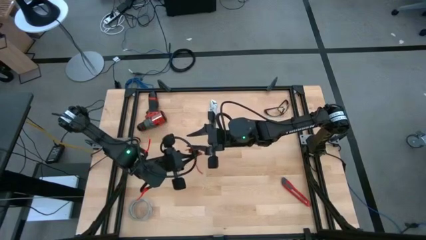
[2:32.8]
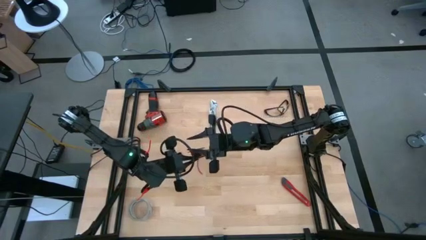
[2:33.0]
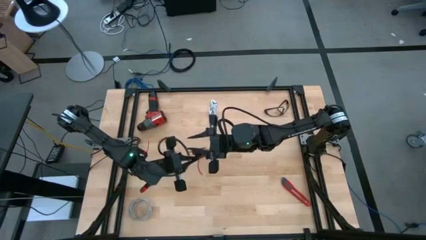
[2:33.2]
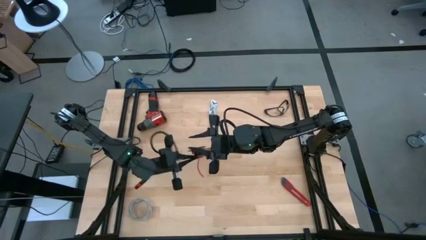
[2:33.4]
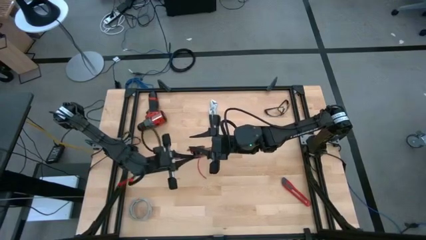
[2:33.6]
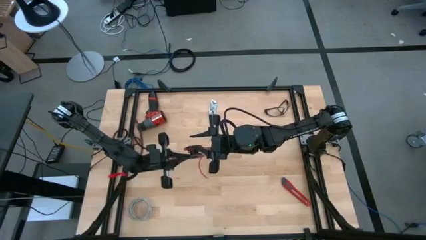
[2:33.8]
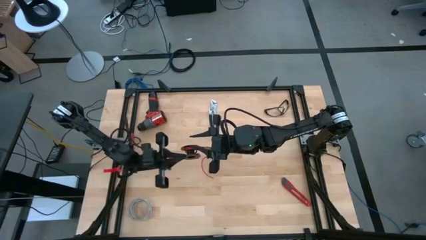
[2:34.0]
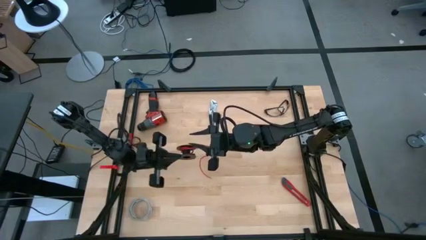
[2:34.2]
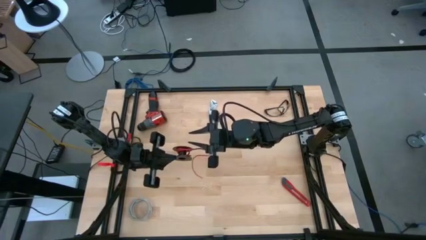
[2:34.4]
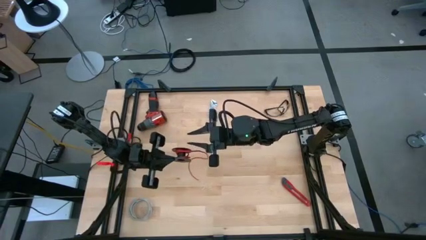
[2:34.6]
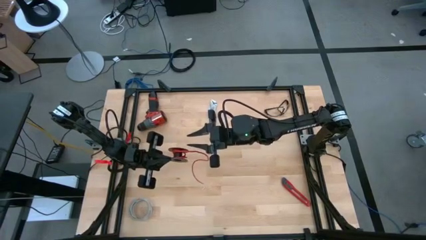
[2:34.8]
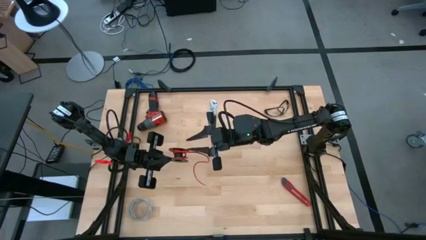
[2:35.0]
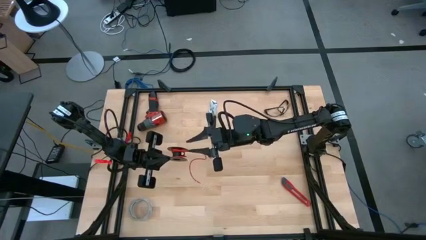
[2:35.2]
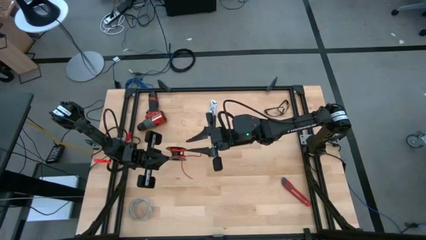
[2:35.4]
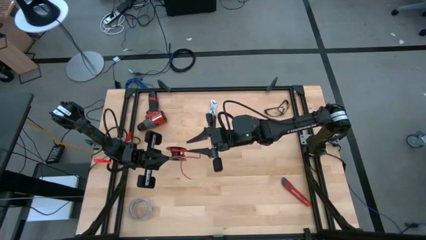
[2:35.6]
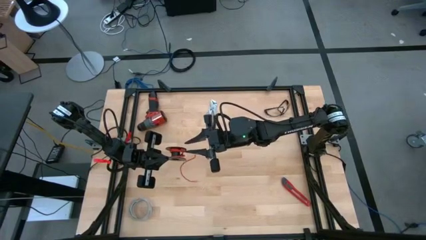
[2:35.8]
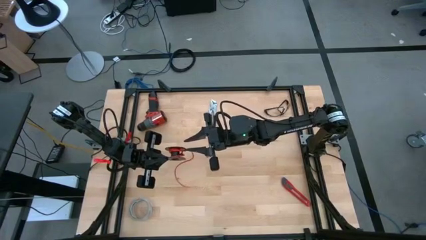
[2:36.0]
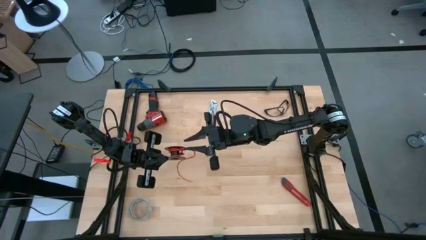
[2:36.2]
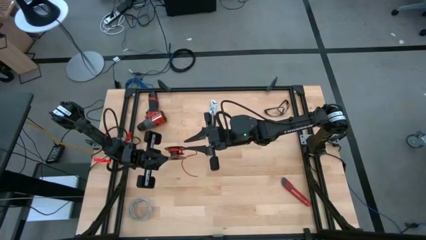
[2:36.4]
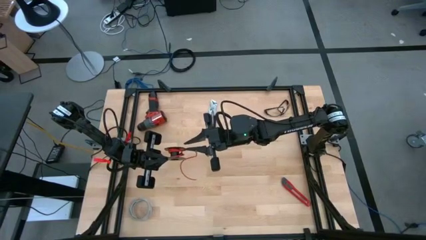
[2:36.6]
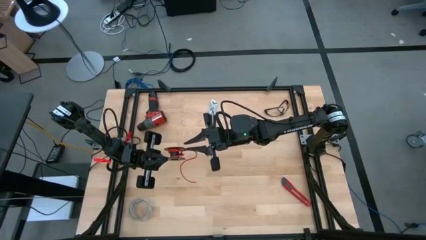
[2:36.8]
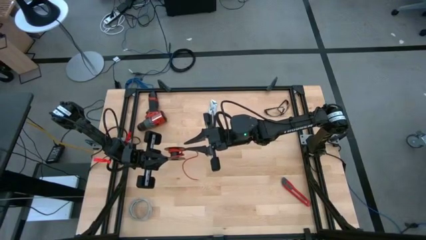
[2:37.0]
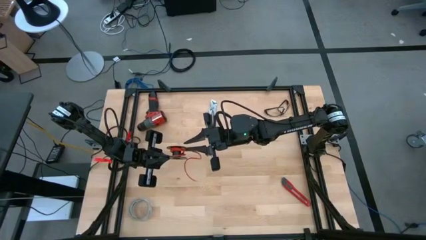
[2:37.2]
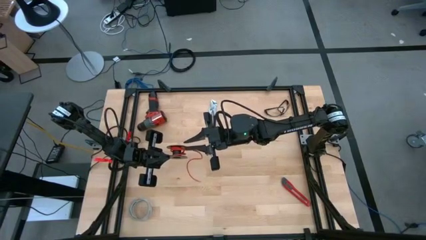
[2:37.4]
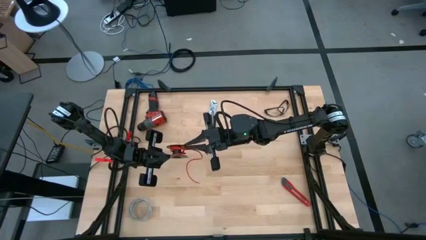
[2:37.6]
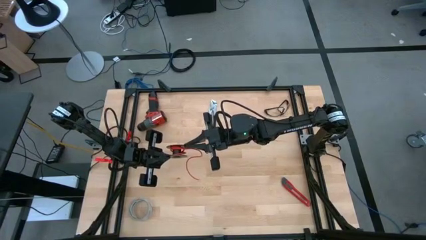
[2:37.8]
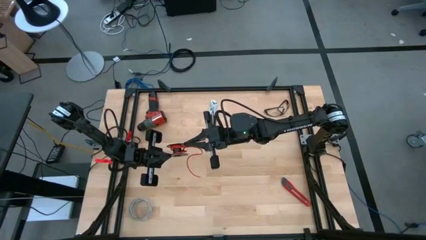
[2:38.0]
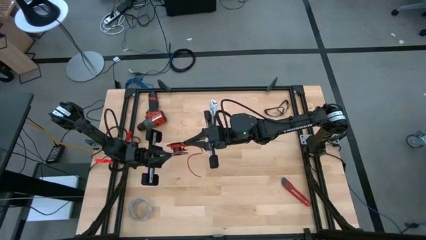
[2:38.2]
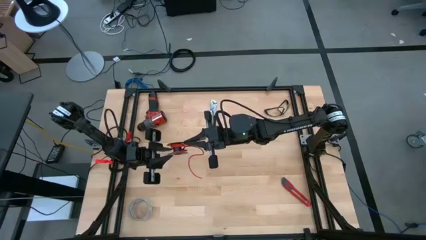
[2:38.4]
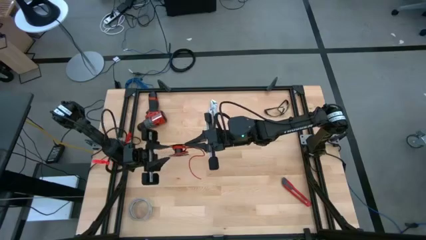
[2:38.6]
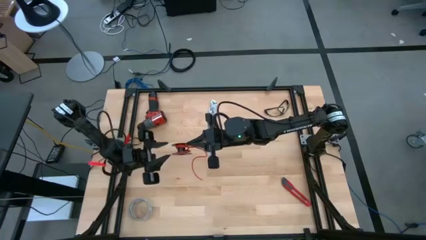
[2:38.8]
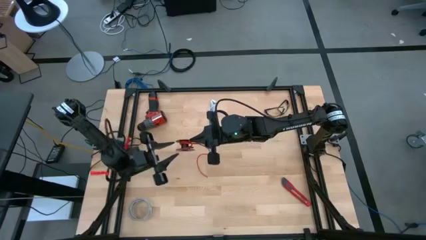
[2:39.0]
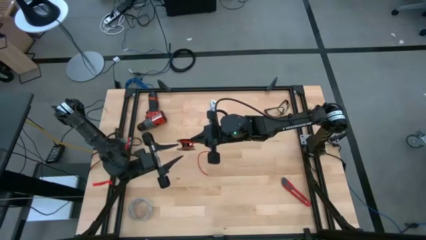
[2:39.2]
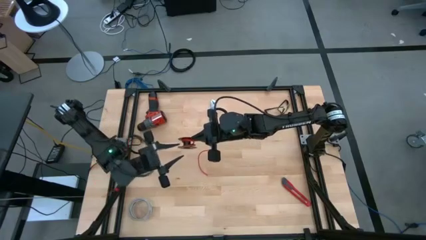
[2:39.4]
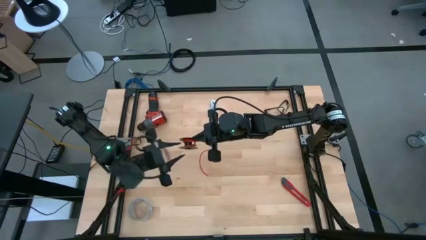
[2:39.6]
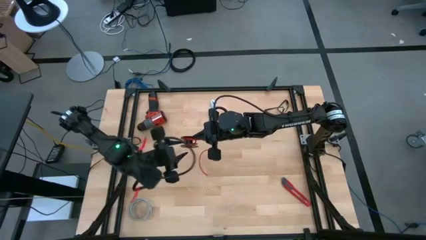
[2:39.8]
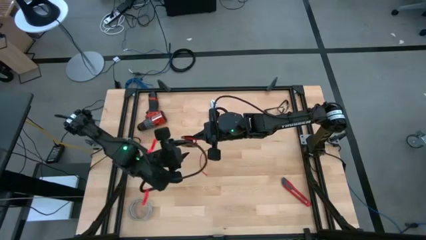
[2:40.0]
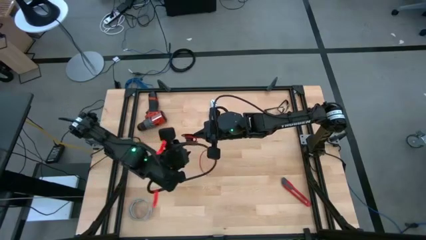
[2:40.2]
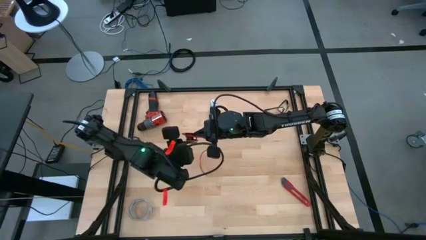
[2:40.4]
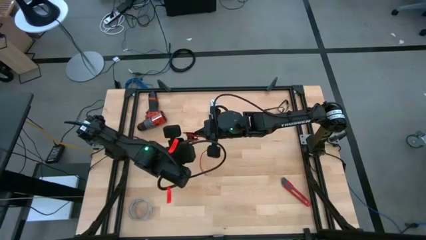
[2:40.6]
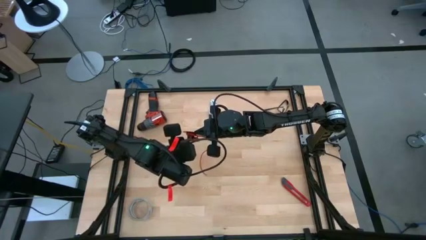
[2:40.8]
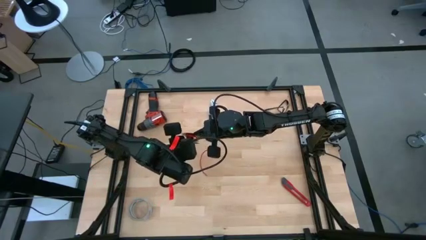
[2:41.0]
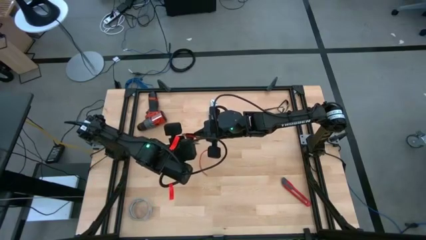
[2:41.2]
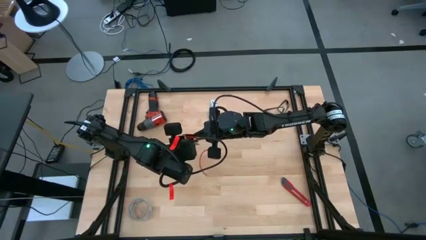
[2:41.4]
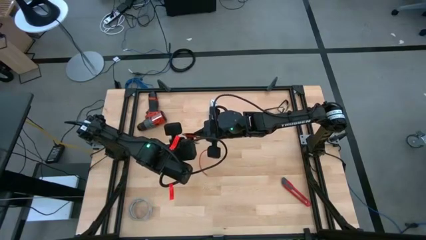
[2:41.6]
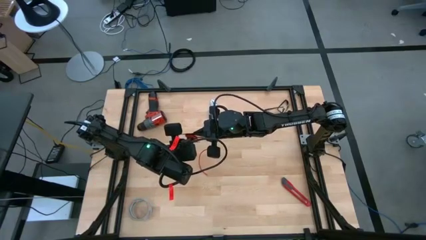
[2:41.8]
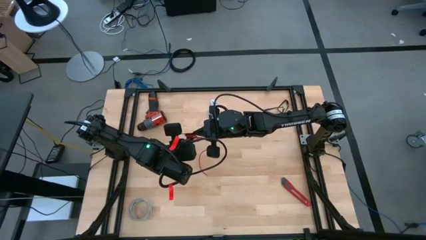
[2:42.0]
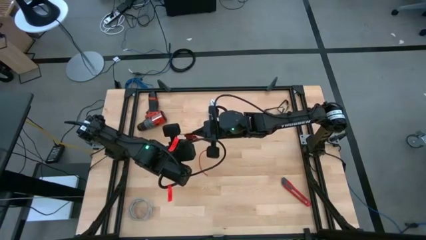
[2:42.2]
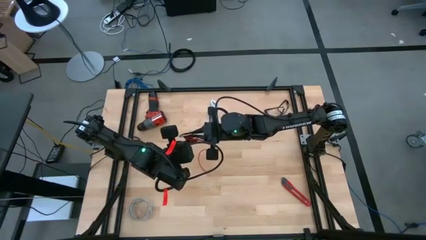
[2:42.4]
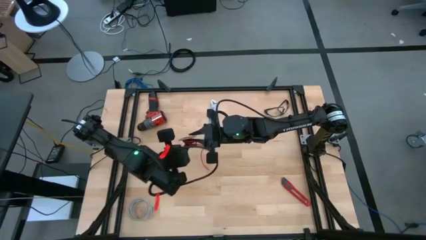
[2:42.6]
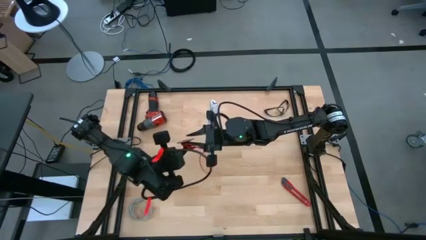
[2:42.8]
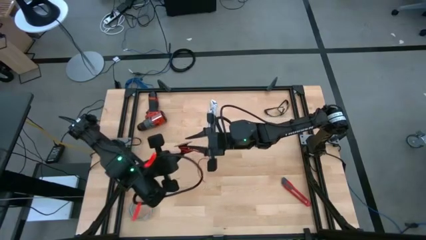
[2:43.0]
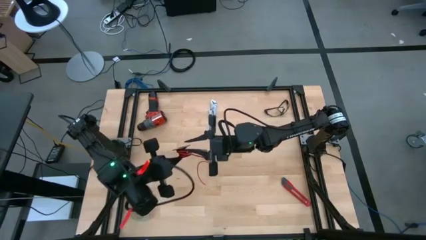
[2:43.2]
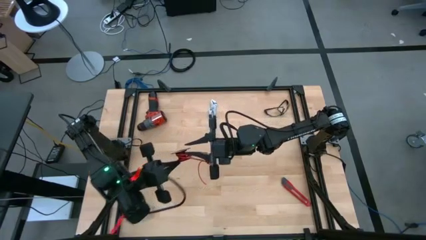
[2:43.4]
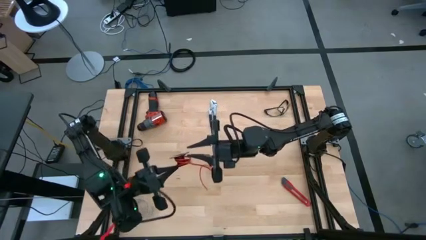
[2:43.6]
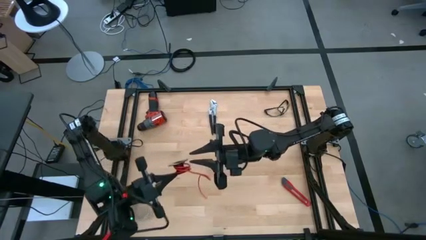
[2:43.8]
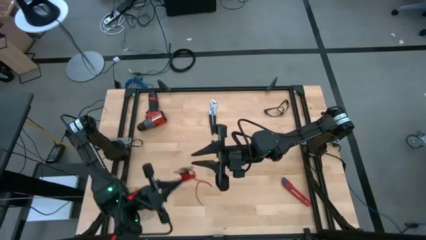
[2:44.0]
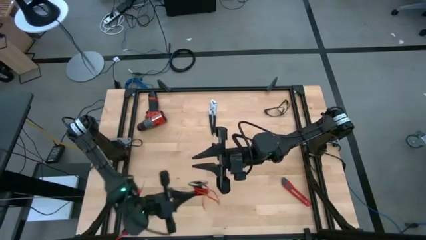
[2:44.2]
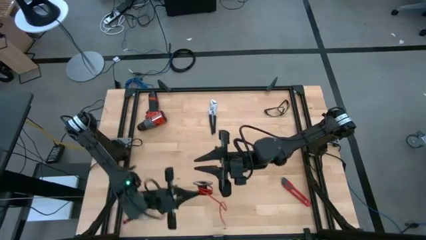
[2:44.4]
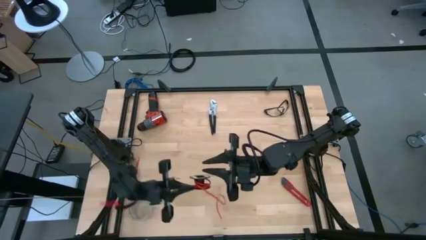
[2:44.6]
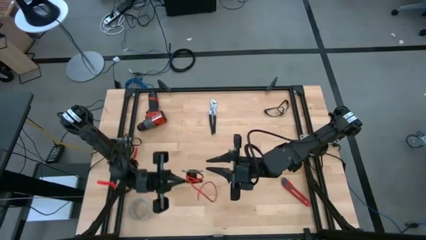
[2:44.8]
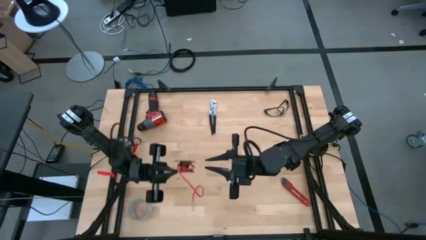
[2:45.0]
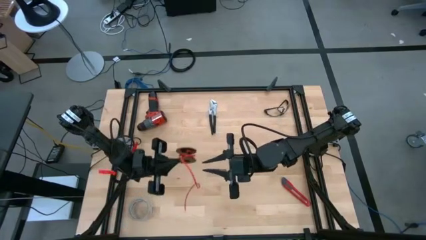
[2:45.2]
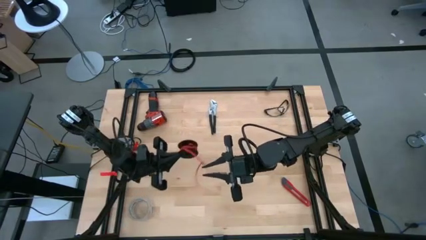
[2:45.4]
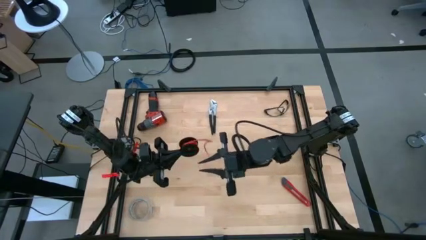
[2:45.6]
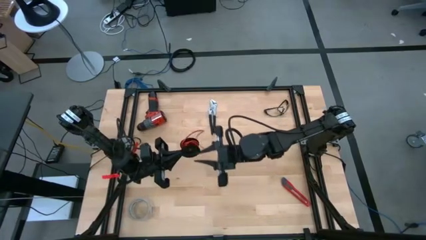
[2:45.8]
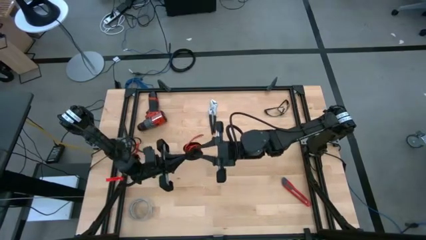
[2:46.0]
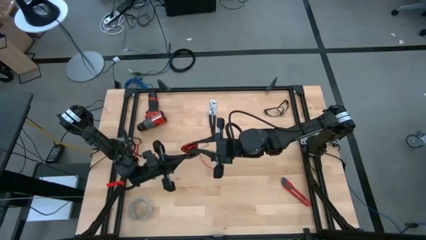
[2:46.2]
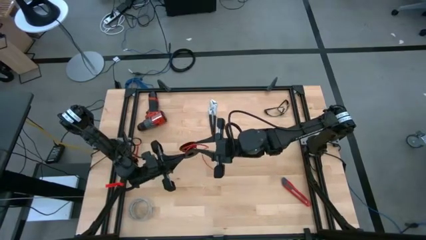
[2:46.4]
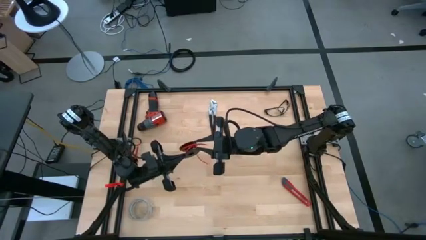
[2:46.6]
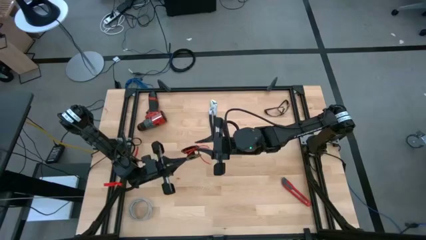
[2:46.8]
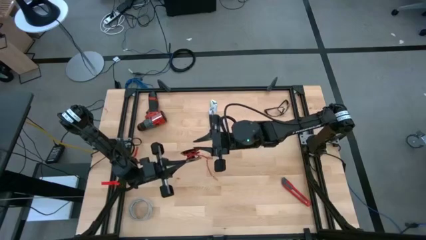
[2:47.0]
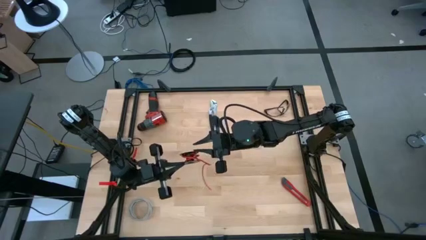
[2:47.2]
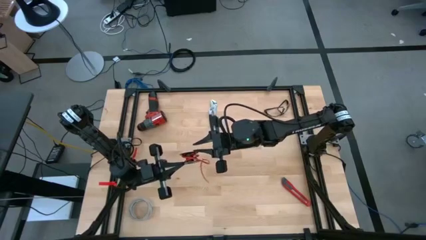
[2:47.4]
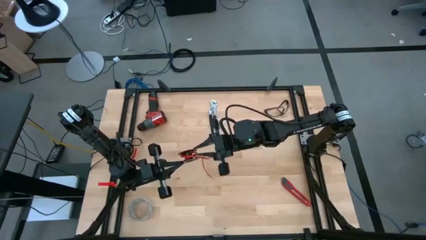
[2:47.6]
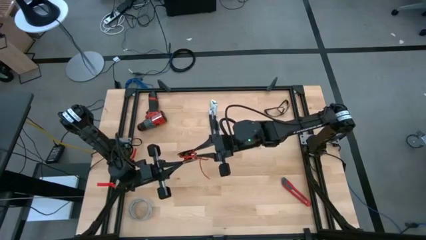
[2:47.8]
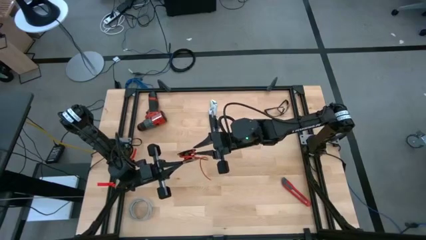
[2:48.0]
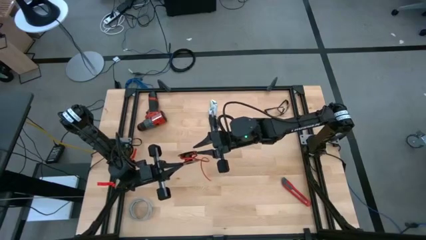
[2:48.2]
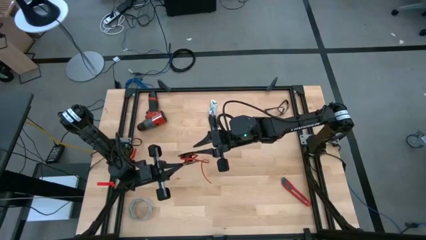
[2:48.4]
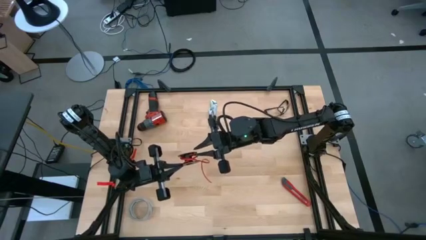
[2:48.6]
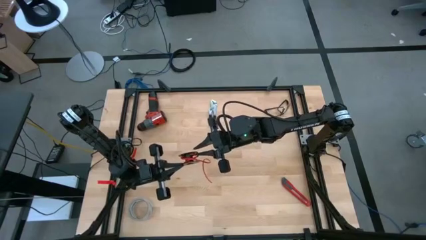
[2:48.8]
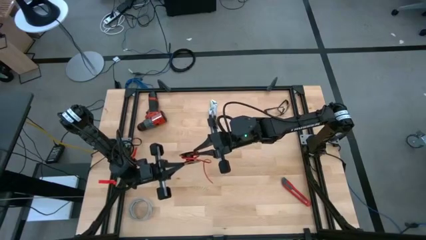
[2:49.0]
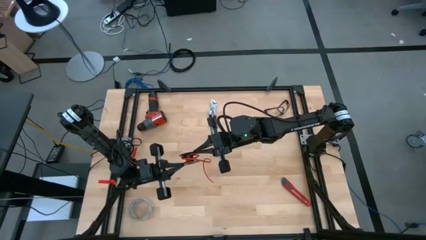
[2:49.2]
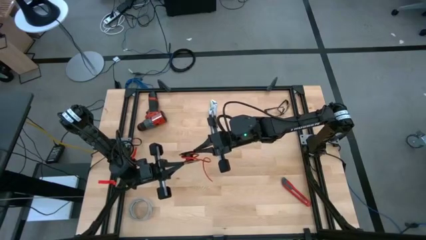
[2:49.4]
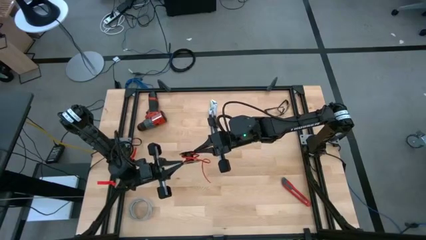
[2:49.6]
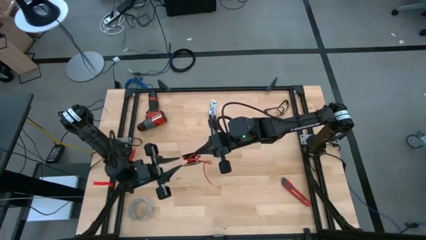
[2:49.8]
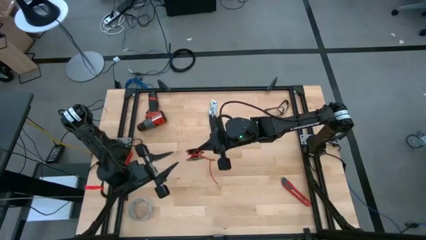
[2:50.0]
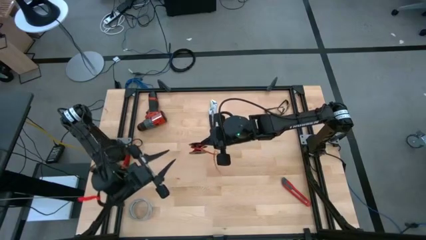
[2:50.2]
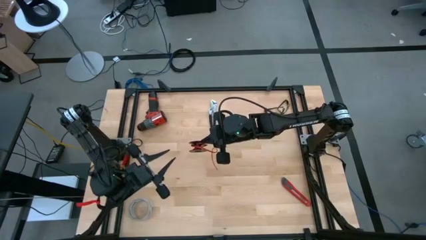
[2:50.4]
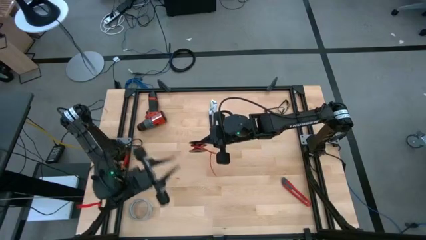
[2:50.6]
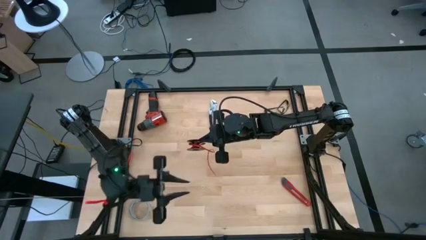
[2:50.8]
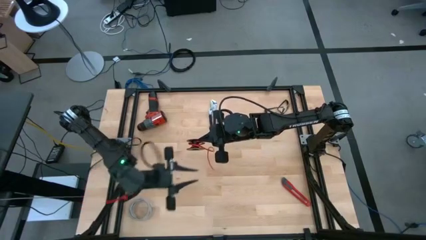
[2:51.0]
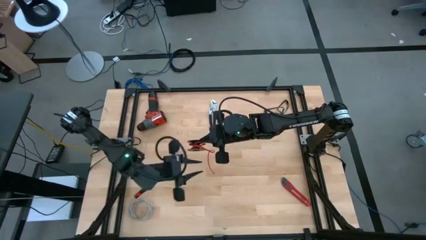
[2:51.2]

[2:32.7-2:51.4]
Task: Coil cords
Coil the red wire onto the black spool
